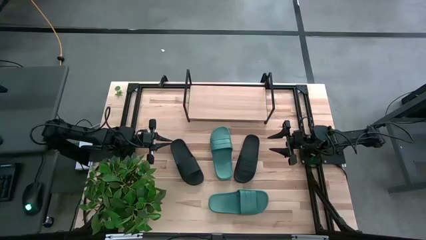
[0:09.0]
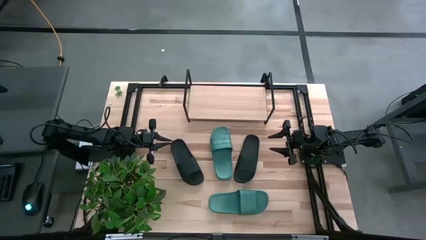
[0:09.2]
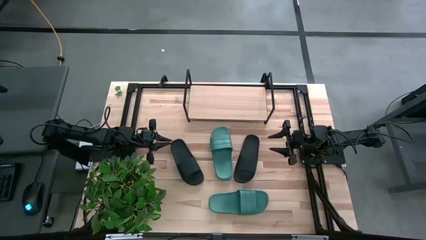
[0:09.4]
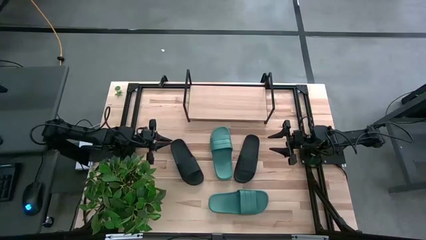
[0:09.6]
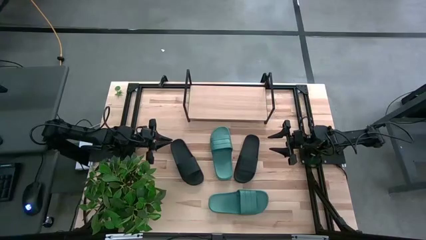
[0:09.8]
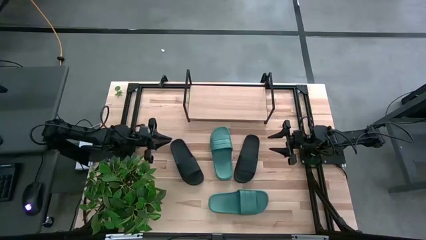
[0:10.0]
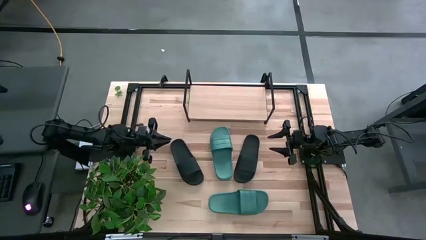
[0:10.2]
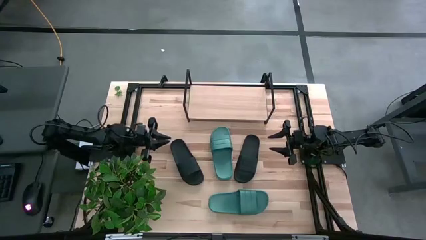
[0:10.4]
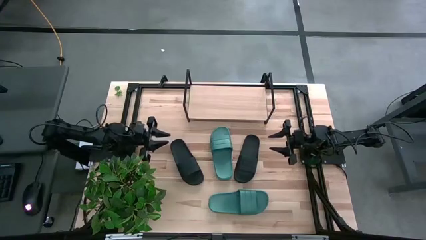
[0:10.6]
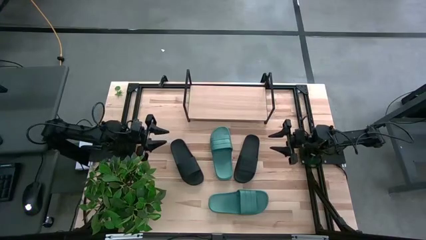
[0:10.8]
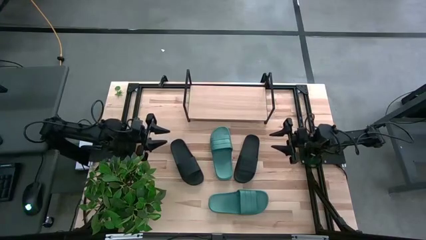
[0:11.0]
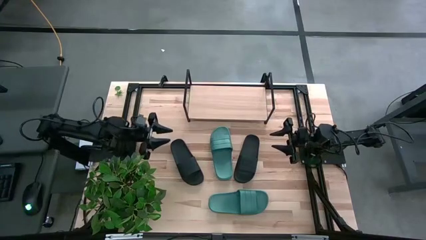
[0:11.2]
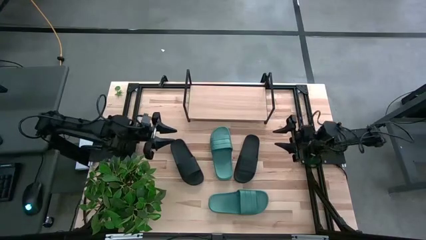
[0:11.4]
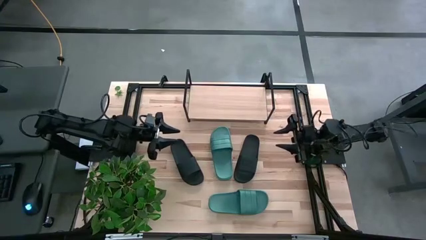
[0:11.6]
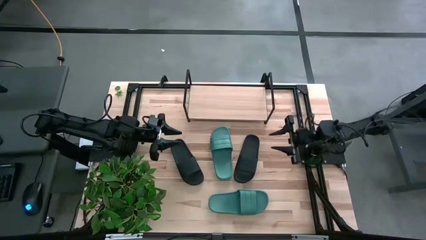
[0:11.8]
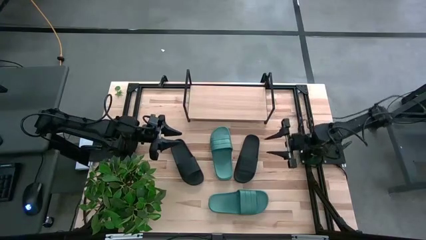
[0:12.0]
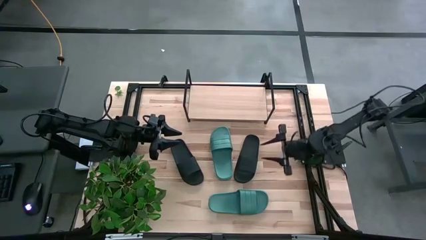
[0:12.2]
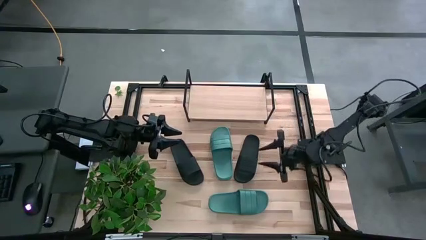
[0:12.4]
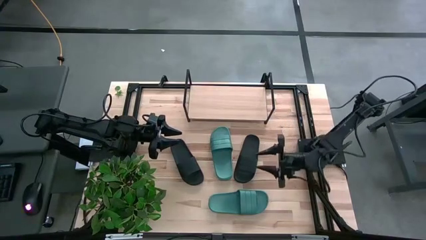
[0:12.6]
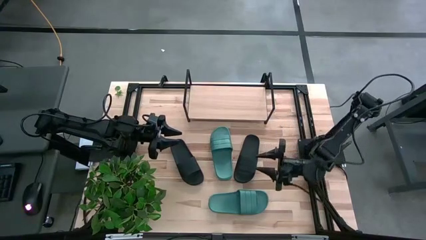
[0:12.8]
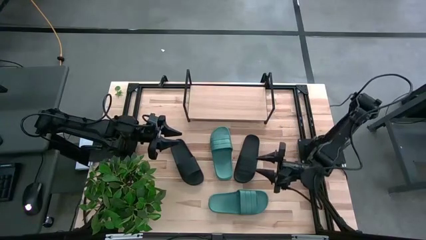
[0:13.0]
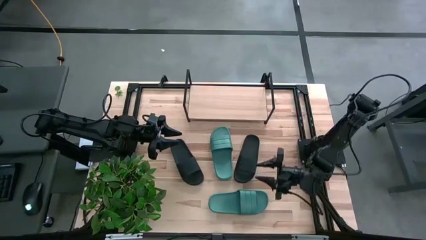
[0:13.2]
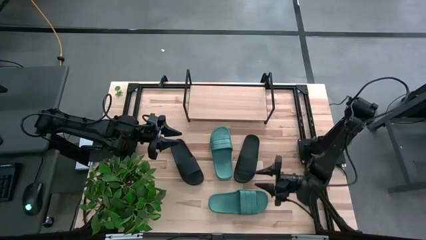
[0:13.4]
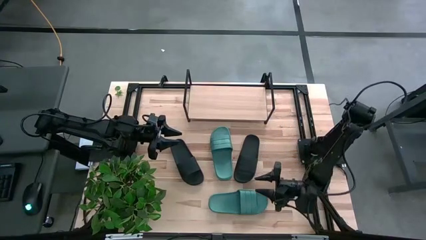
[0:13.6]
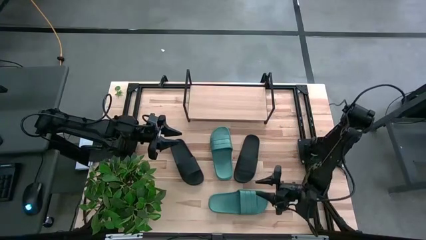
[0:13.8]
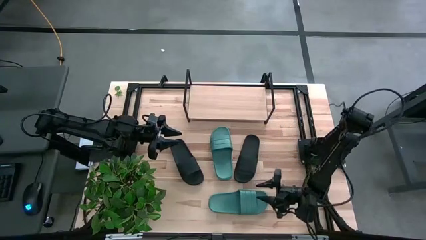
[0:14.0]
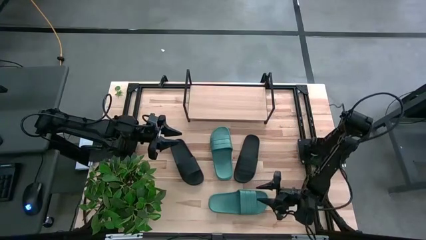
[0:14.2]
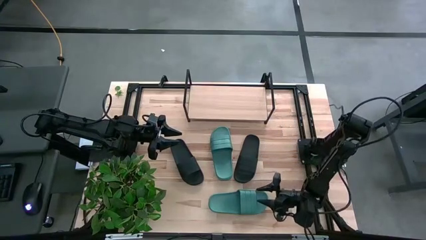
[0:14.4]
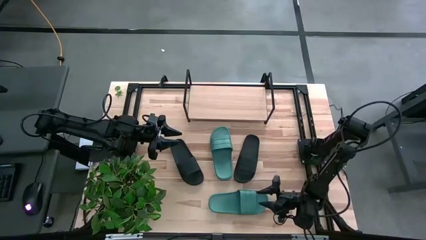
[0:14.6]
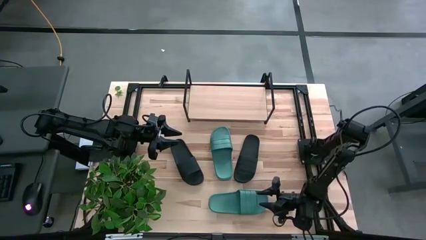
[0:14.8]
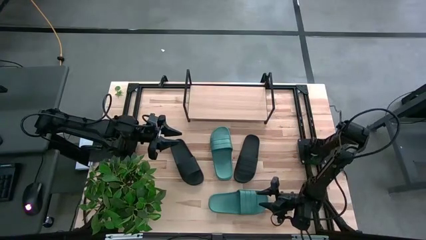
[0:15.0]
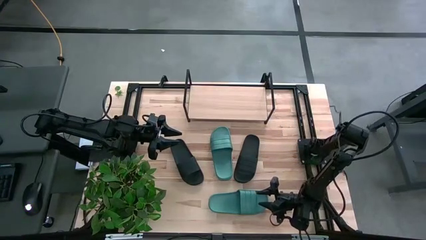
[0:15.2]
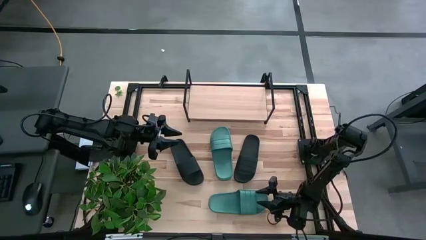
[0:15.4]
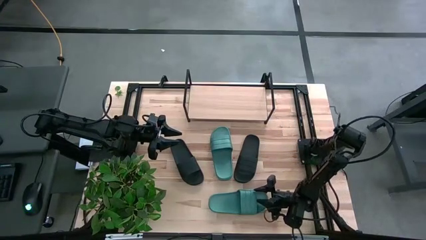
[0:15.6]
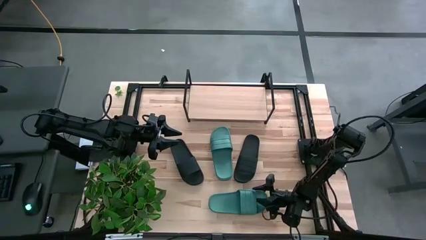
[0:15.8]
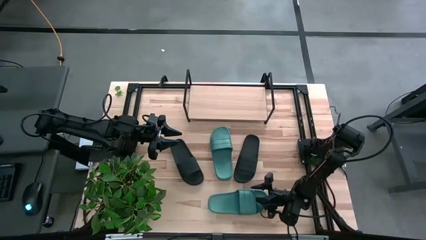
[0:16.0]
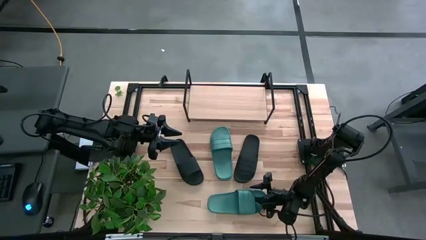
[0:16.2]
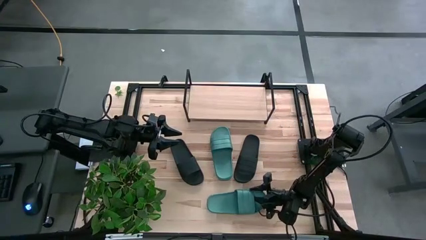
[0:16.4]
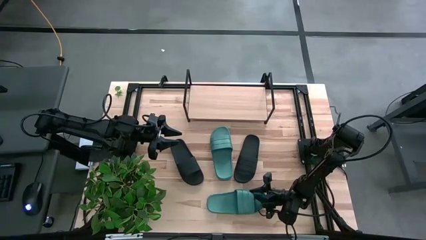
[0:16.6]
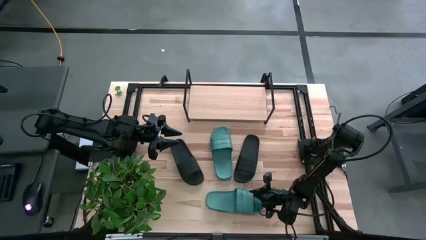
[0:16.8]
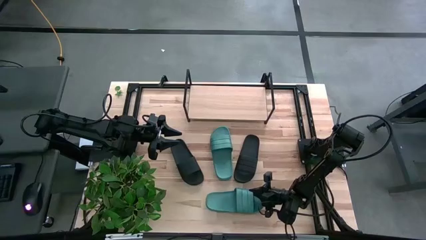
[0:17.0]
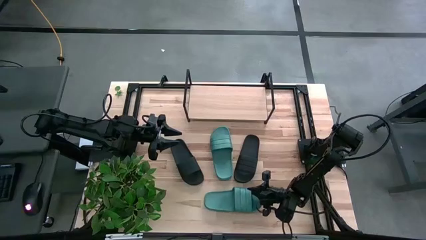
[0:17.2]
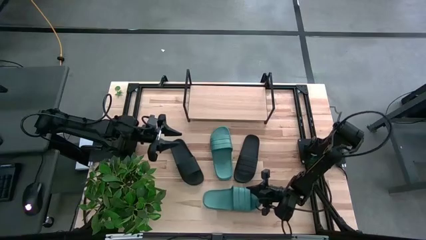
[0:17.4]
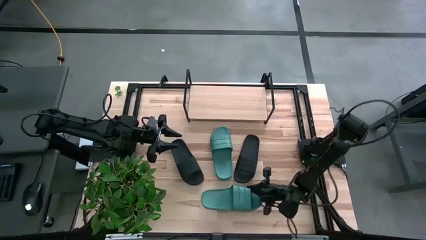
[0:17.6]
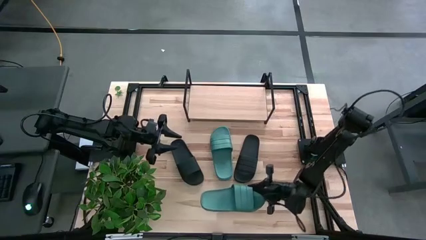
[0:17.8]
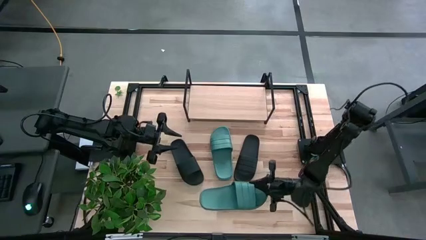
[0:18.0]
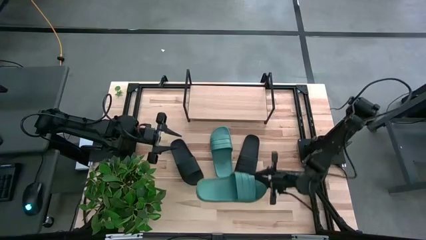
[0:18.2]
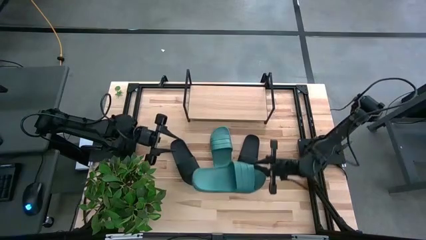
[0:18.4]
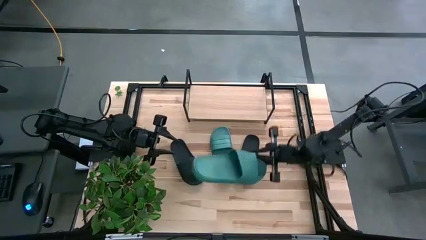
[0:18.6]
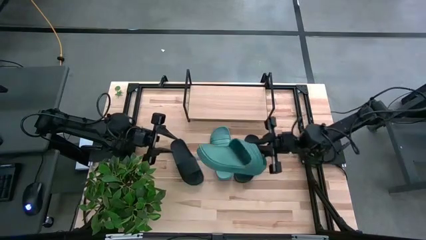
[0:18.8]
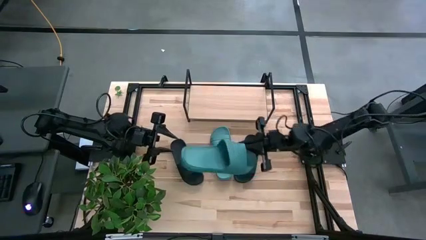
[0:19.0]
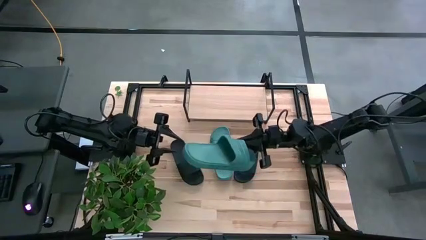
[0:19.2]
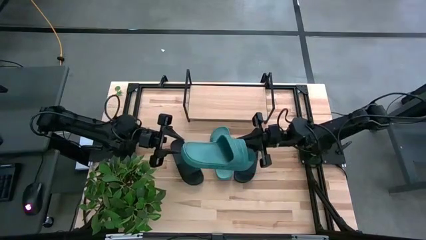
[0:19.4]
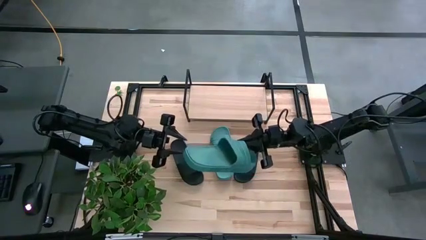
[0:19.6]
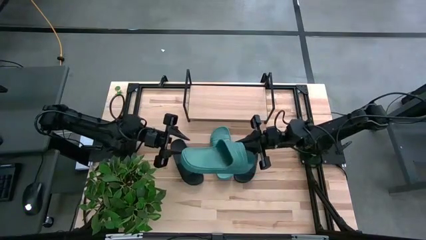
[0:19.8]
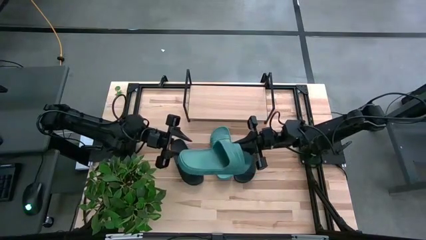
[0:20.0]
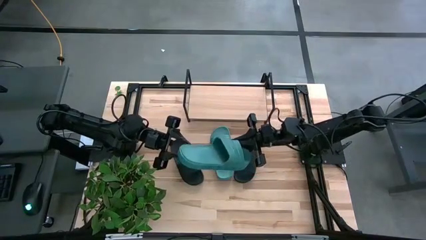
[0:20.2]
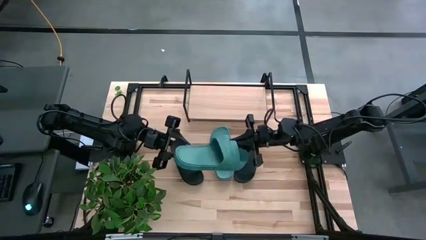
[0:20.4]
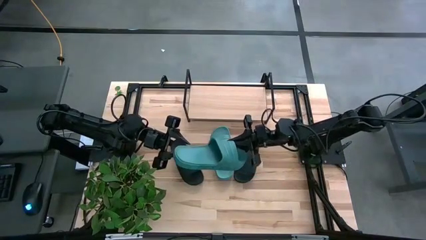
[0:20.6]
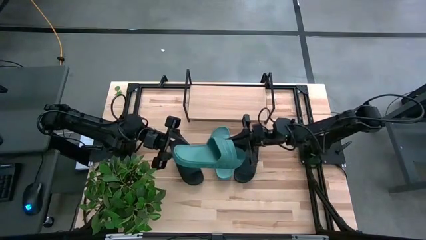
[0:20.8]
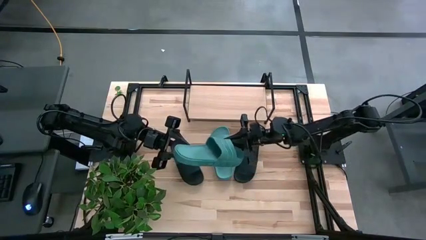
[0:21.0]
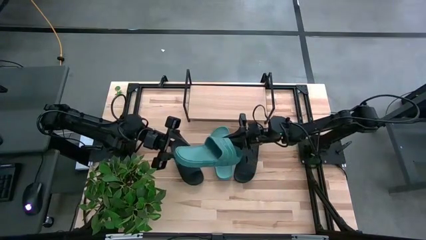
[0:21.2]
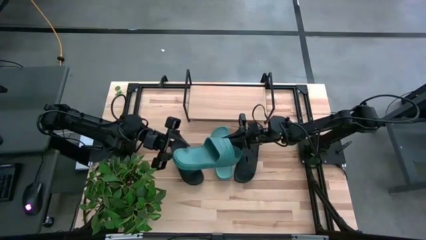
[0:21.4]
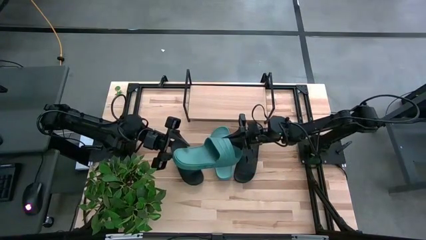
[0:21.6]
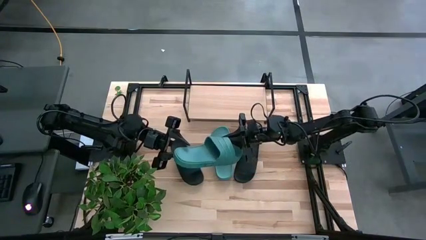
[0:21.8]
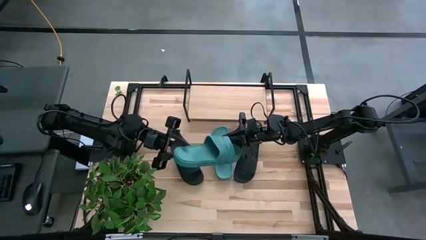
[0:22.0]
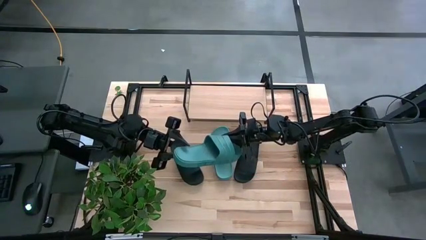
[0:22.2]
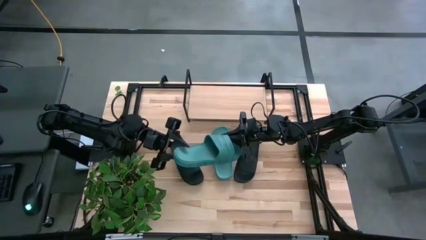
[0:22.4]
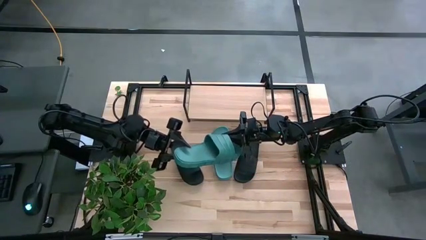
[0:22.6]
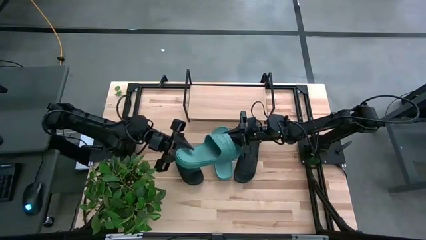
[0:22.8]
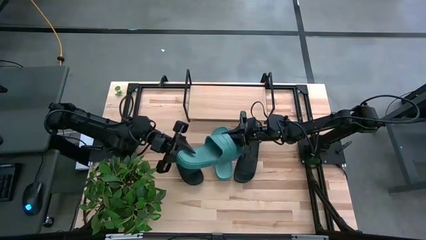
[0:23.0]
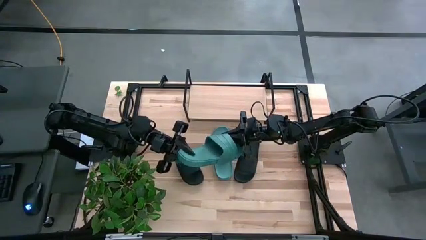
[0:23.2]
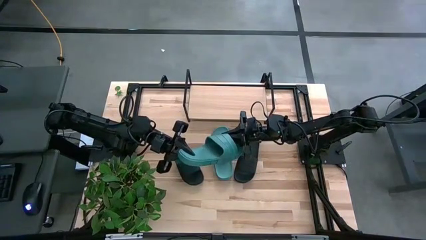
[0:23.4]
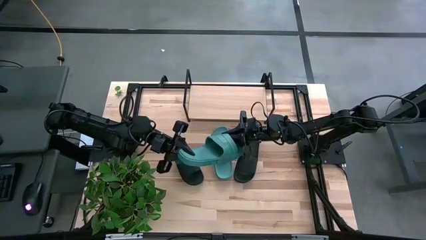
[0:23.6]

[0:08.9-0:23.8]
Task: Pick and place slides into the shelf
Put the bottom green slides on the shelf
